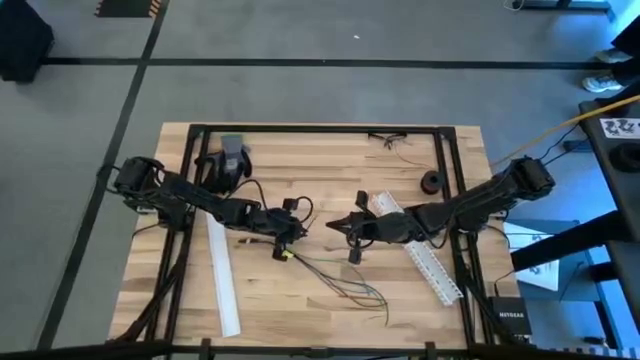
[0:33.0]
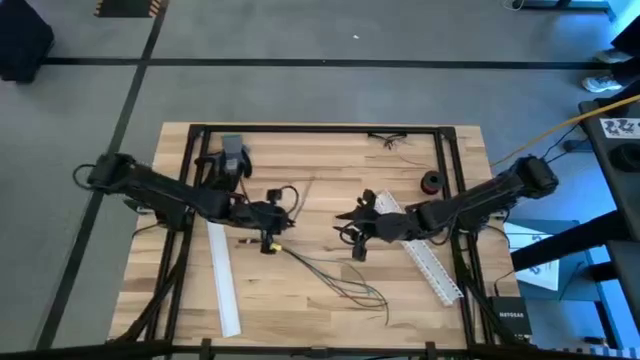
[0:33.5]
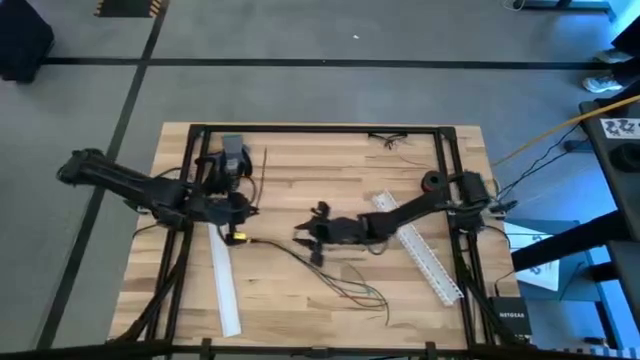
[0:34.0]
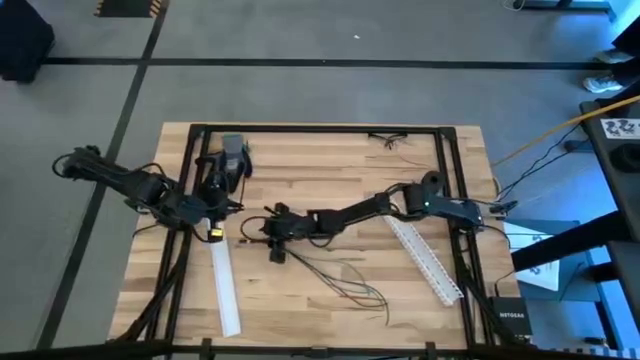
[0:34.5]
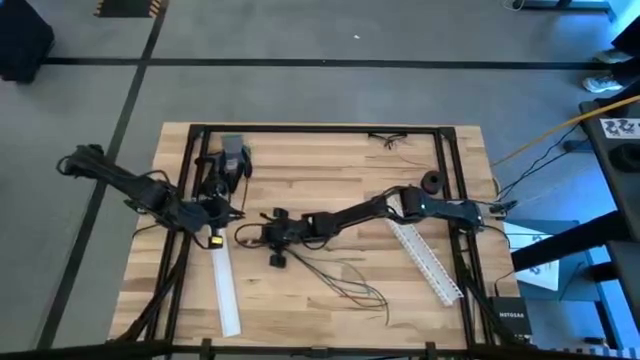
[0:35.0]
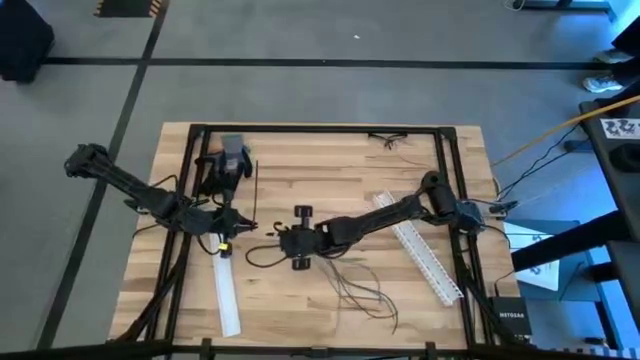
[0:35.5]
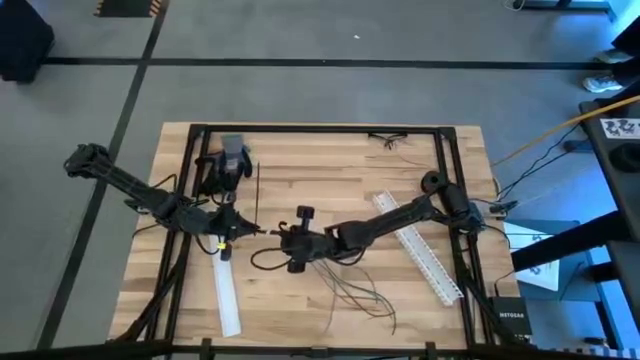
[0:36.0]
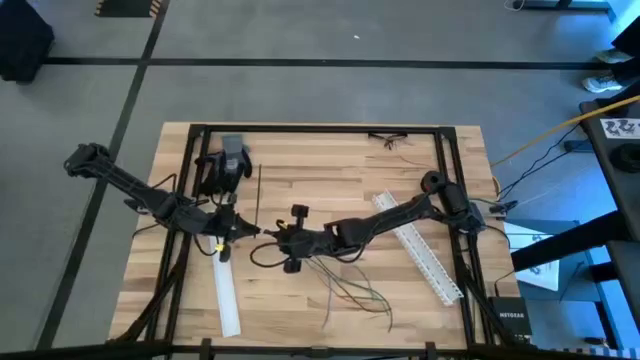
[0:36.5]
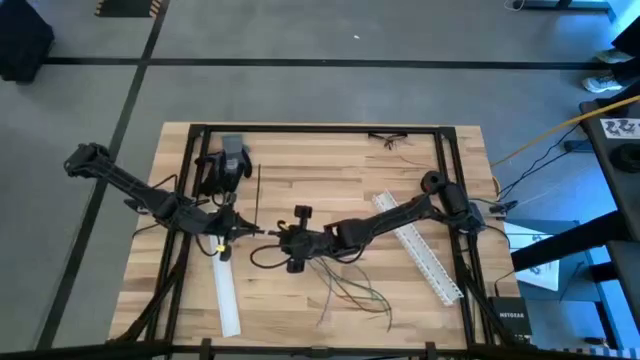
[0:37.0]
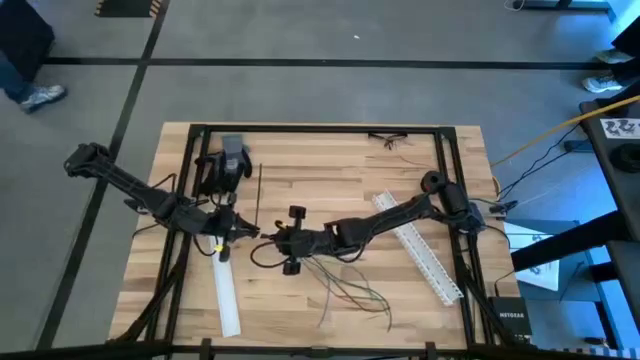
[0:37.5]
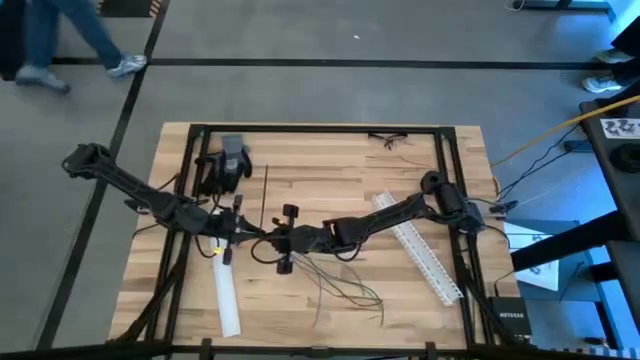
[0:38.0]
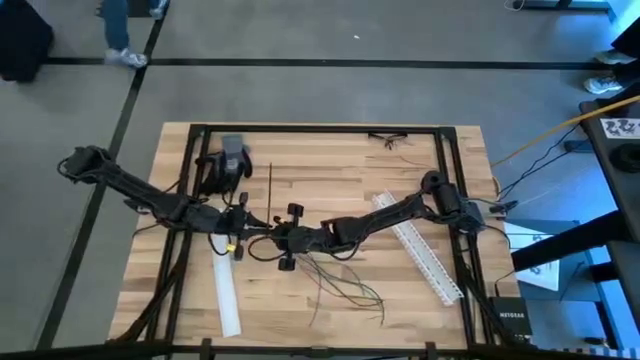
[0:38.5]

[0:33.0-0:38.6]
Task: Ziptie cables
Wrap the cables together using the black zip tie

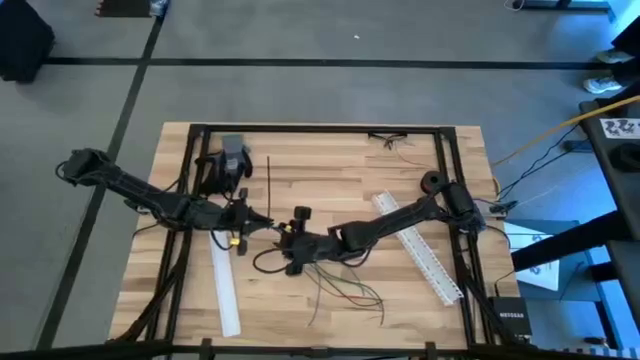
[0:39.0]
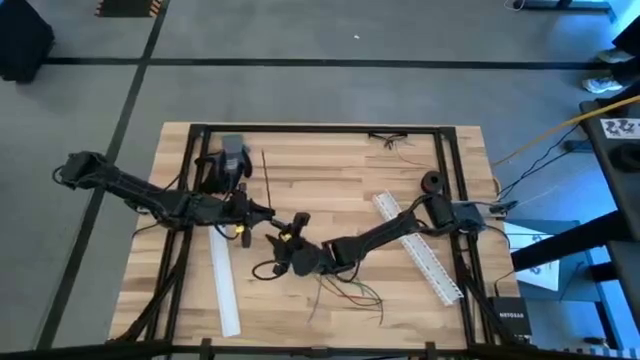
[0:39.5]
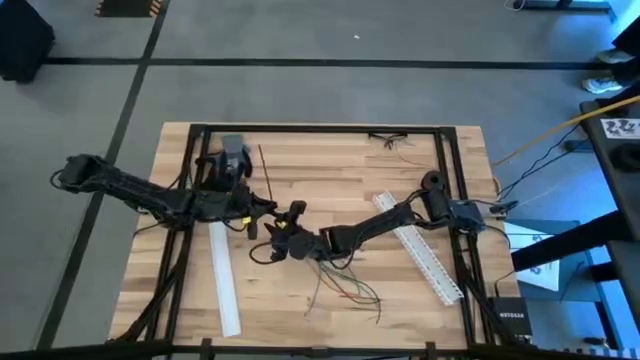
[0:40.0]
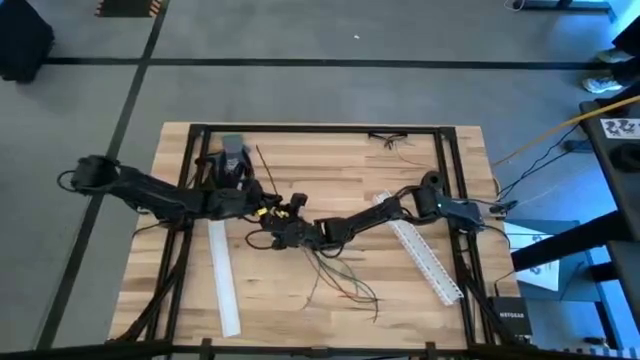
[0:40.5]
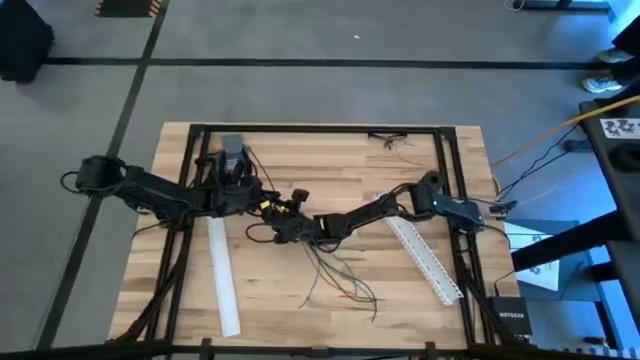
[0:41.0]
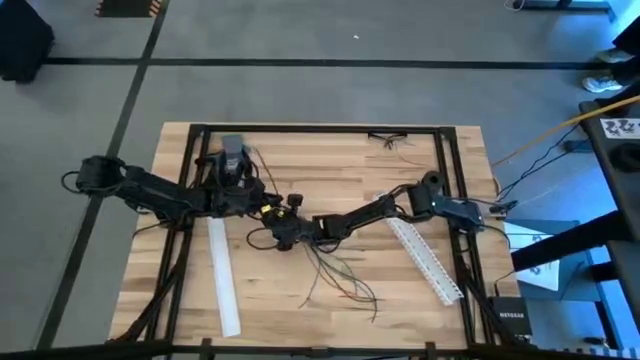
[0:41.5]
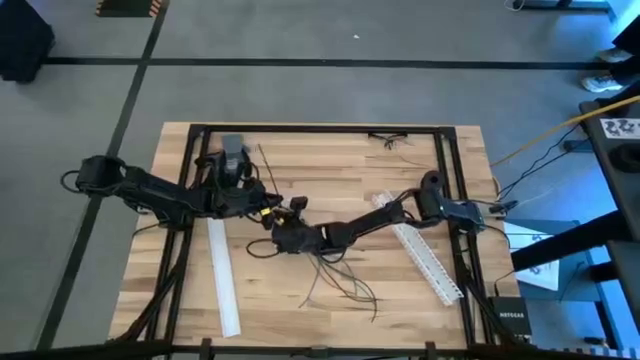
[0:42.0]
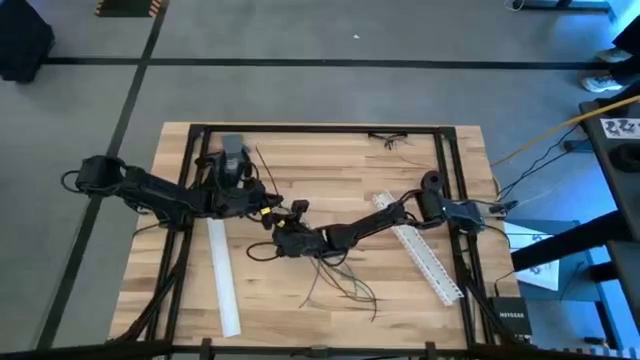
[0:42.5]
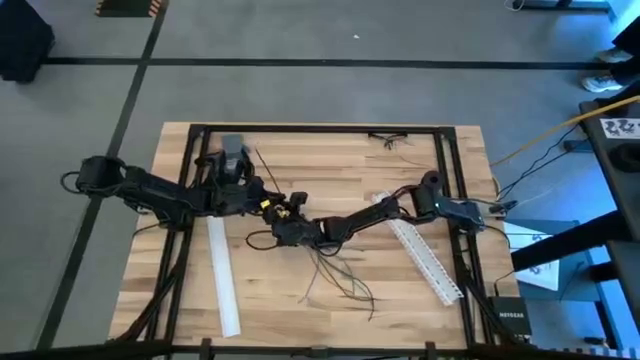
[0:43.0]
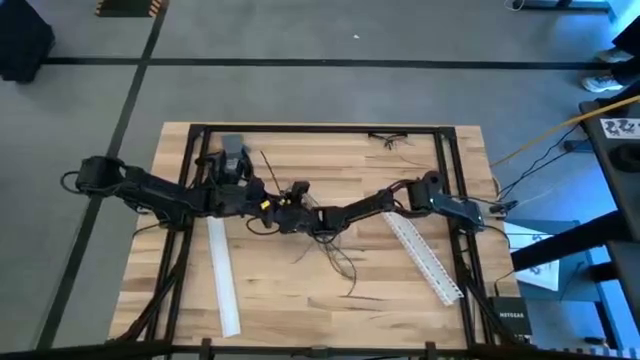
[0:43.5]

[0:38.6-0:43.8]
Wrap the cables together using the black zip tie

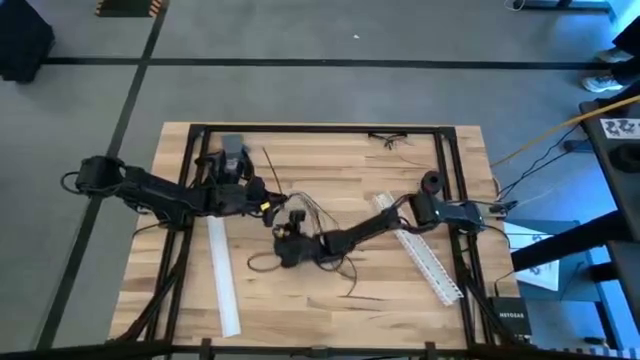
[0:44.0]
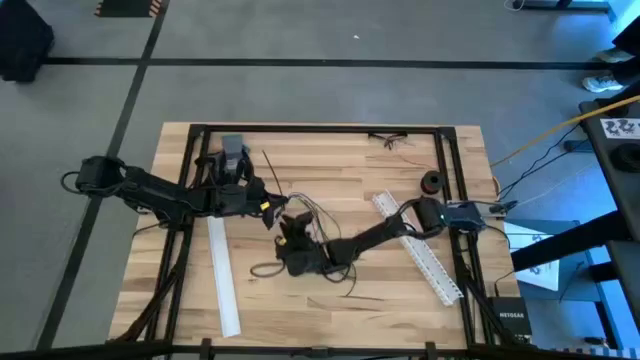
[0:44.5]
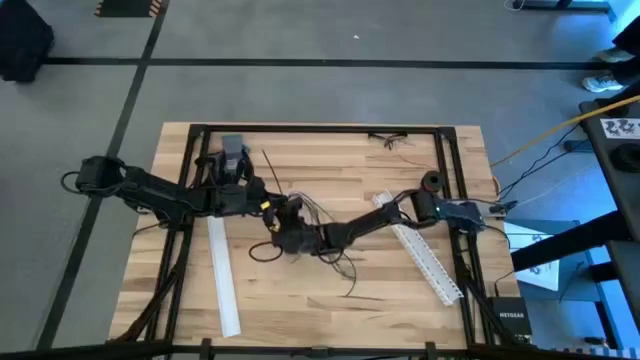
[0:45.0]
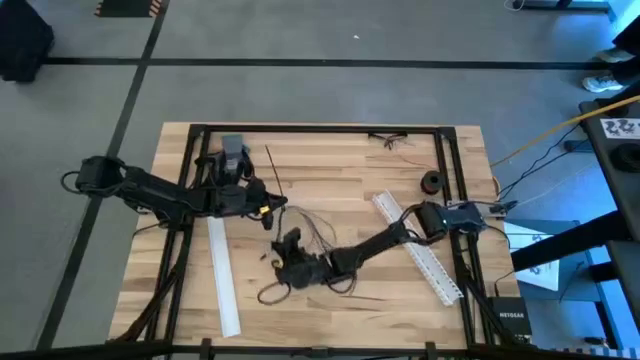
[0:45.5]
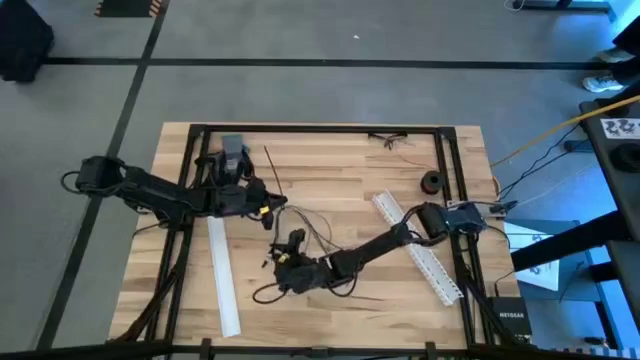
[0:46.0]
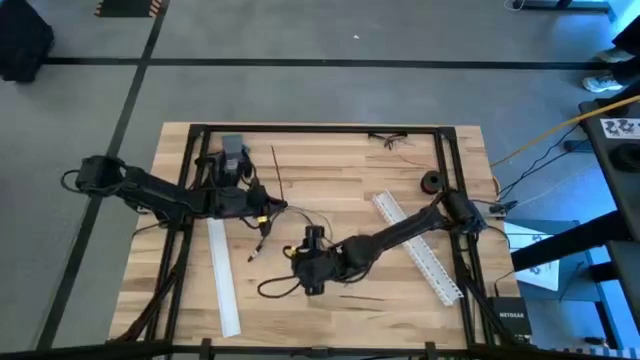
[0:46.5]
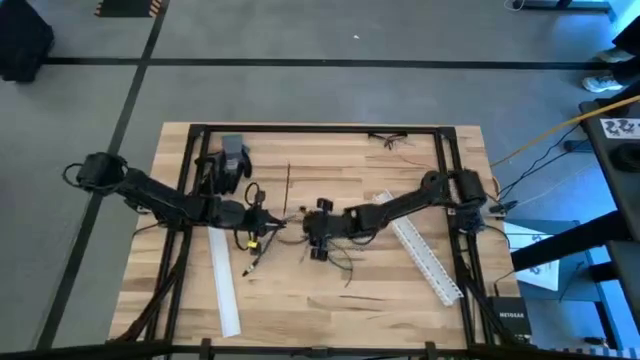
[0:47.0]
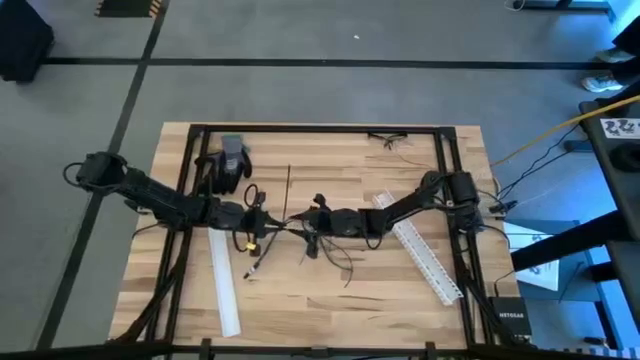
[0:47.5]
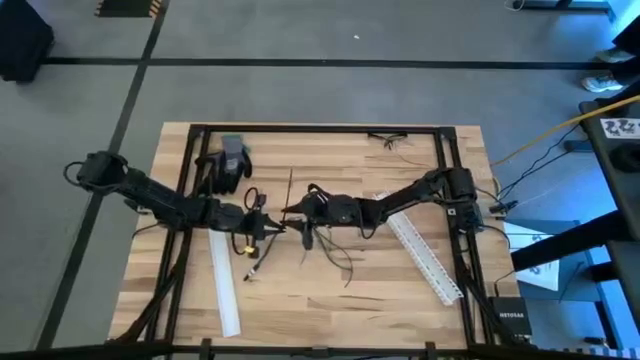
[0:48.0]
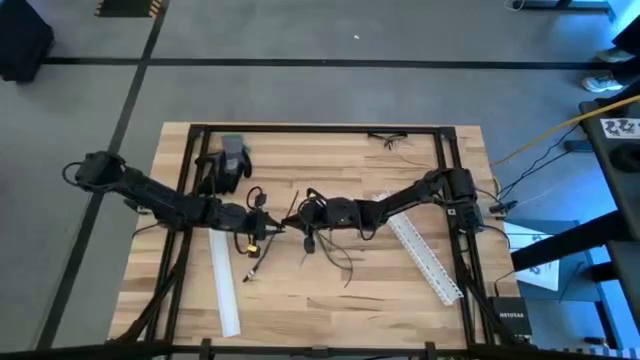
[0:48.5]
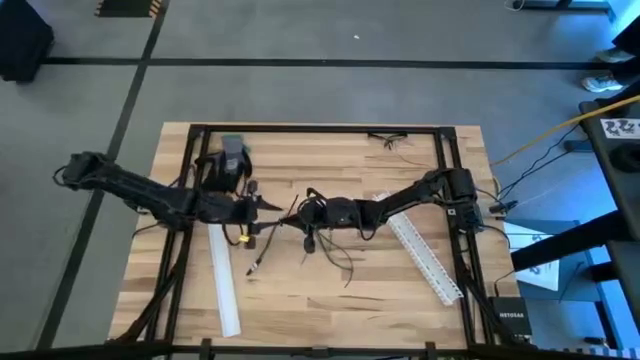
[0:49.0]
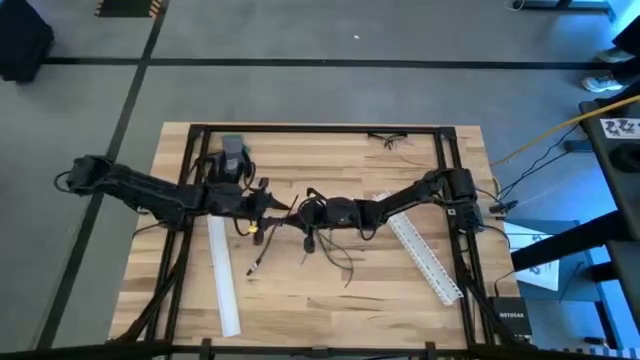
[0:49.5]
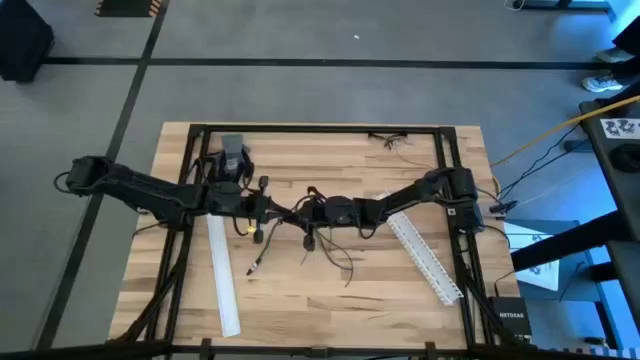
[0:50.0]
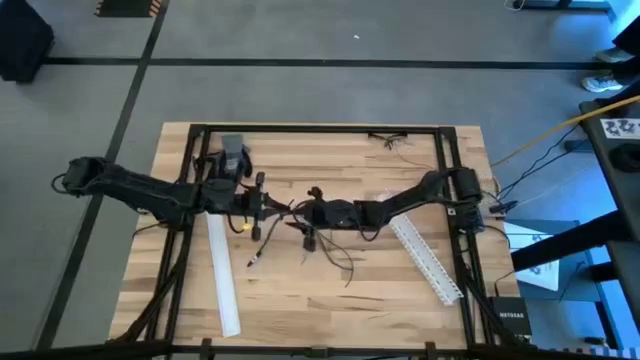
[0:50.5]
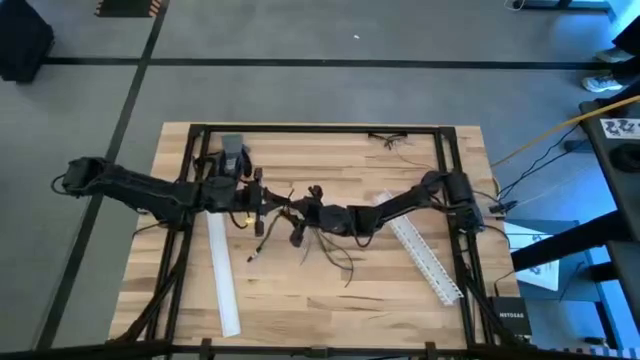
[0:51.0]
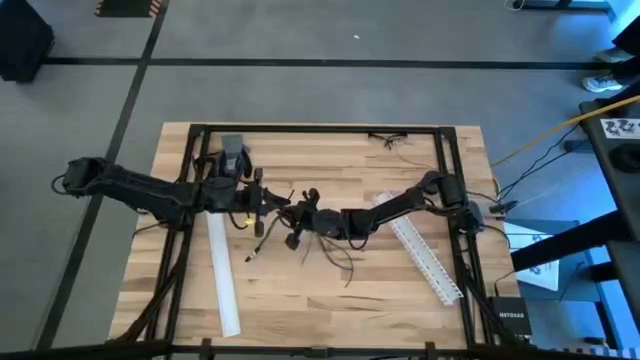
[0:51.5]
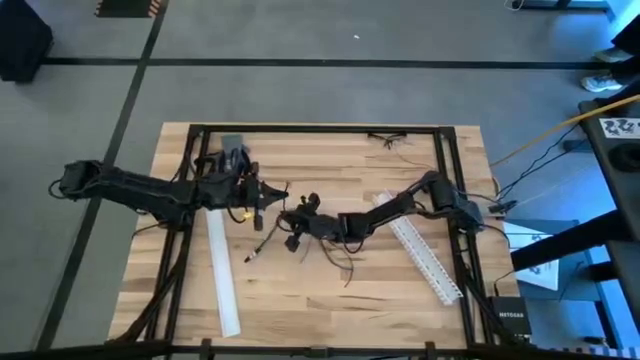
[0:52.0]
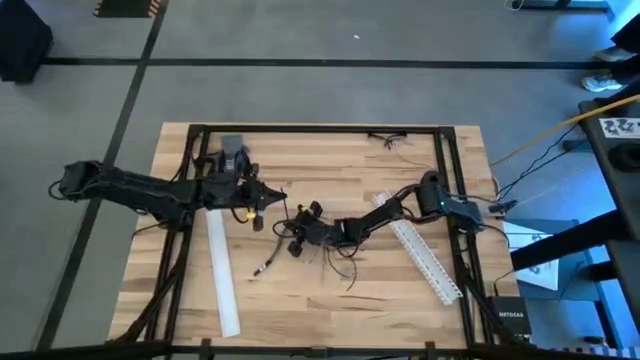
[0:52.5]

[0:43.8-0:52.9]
Wrap the cables together using the black zip tie

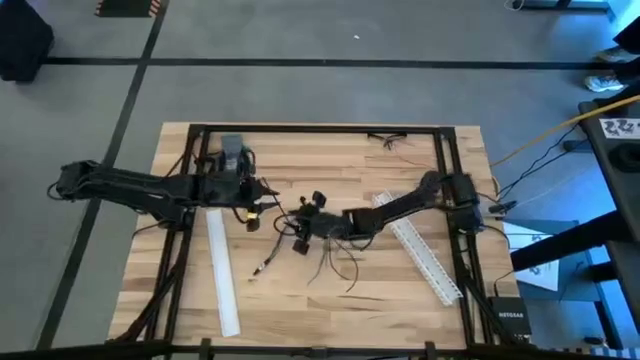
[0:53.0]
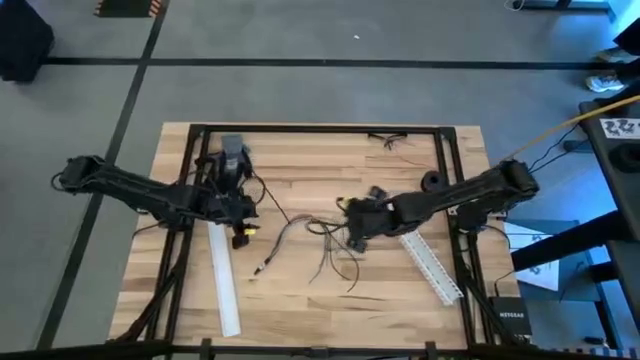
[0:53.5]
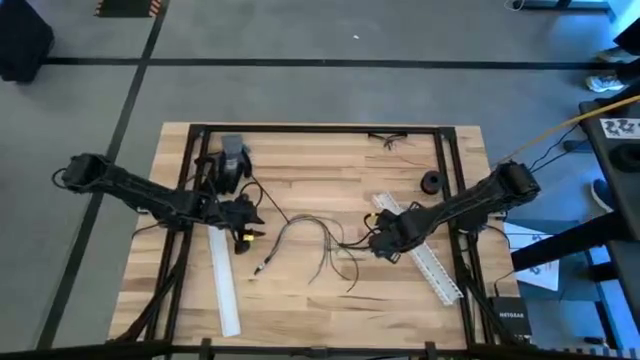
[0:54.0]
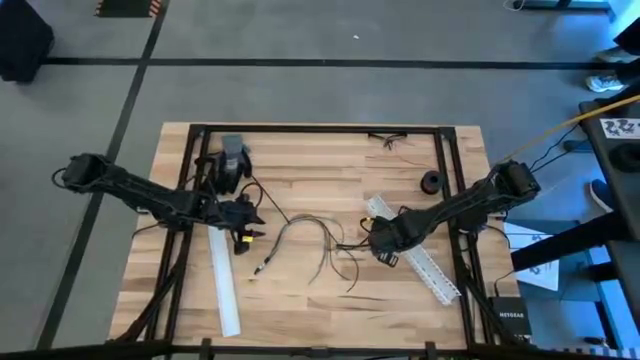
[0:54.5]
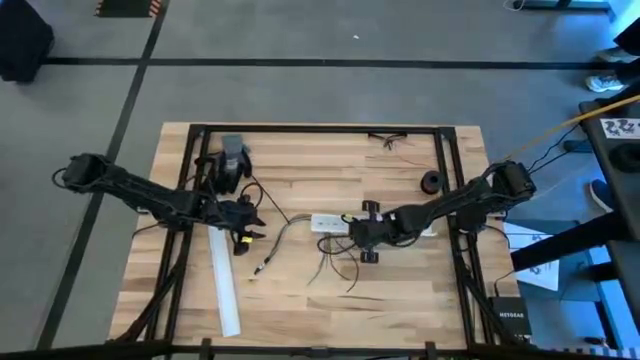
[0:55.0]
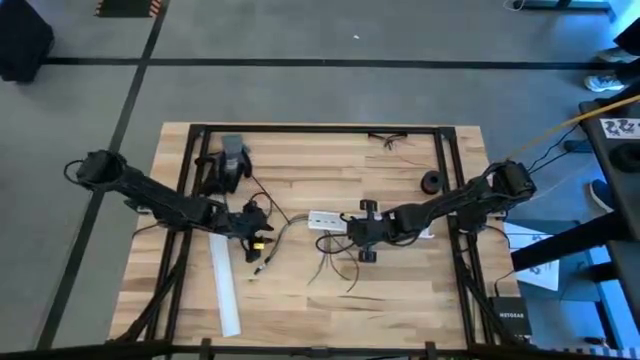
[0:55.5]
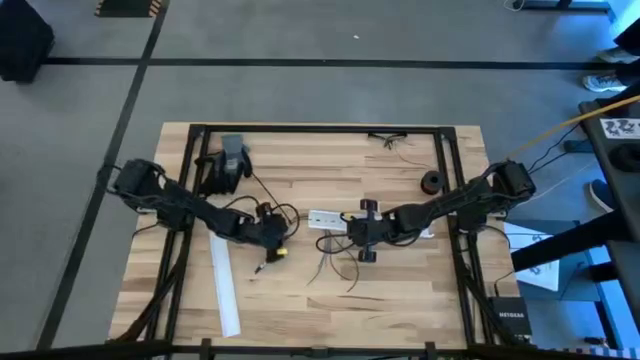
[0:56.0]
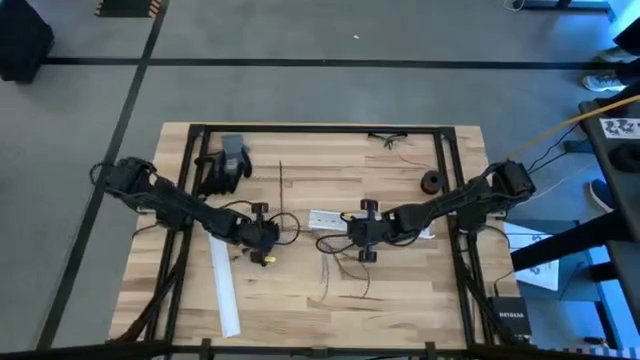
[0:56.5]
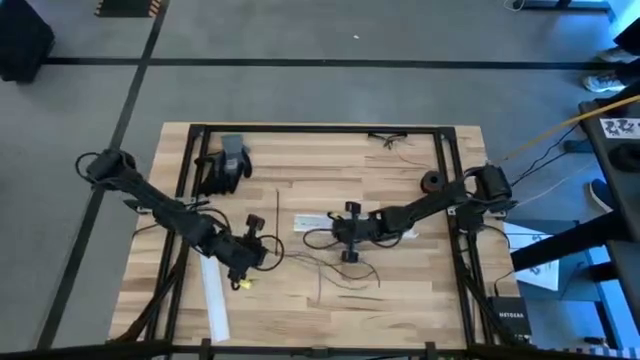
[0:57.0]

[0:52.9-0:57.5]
Prepare the white cable duct
